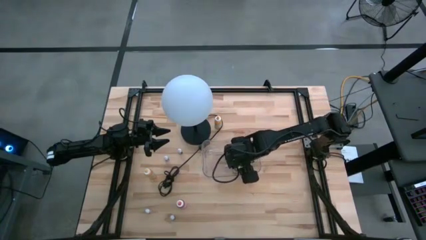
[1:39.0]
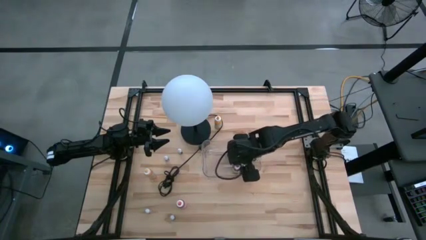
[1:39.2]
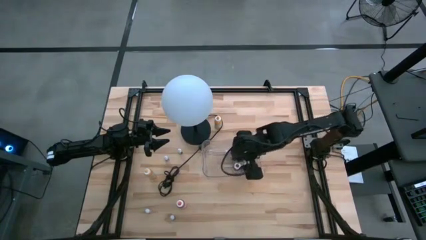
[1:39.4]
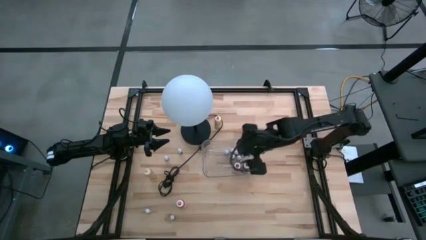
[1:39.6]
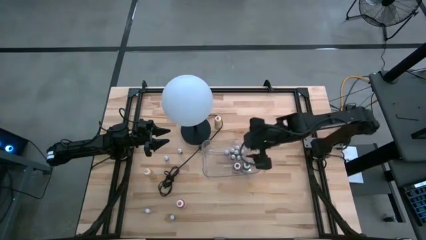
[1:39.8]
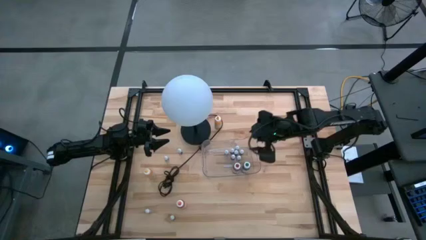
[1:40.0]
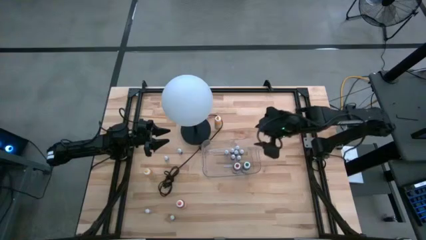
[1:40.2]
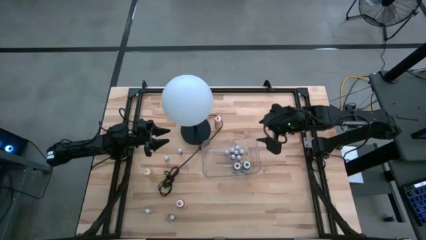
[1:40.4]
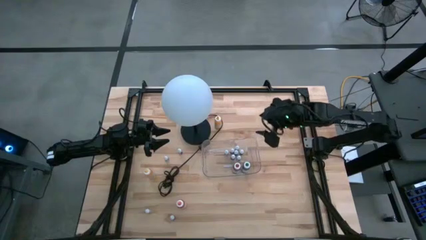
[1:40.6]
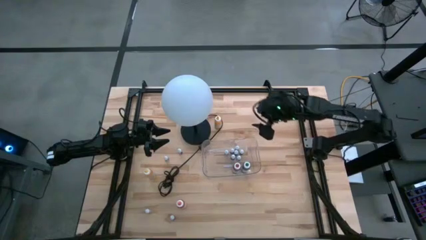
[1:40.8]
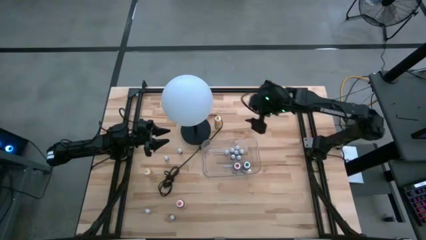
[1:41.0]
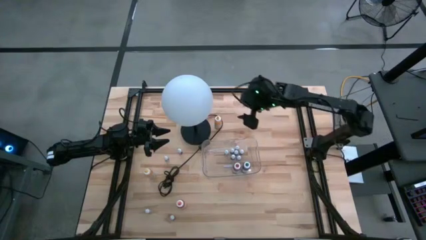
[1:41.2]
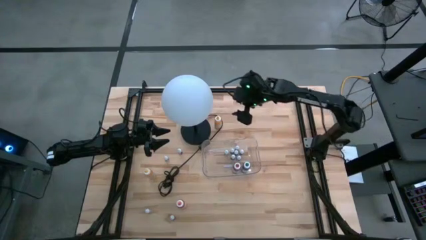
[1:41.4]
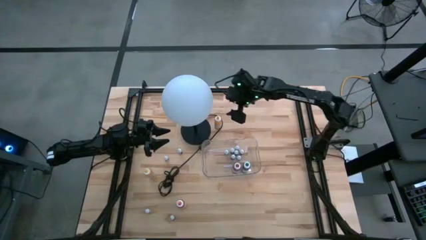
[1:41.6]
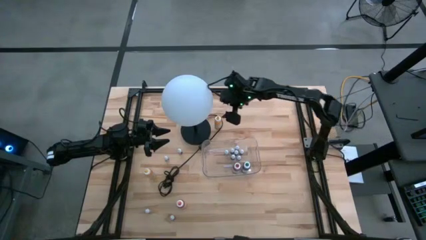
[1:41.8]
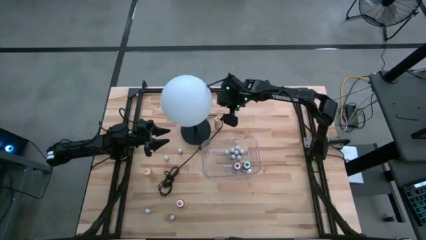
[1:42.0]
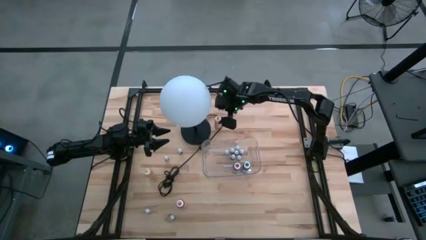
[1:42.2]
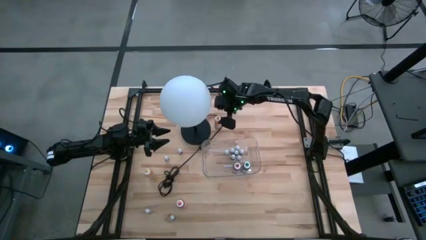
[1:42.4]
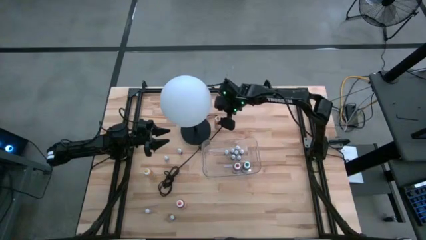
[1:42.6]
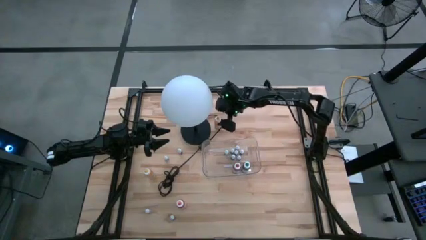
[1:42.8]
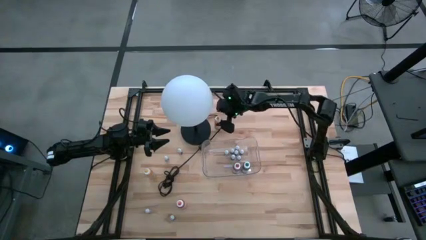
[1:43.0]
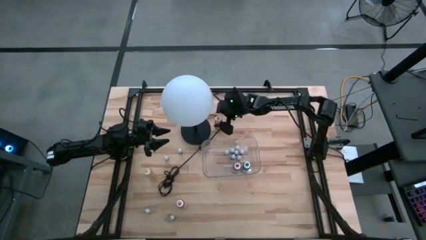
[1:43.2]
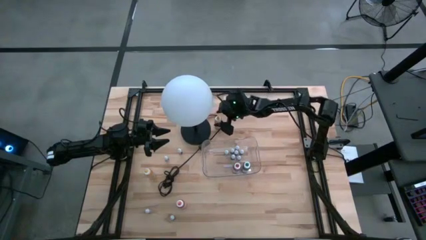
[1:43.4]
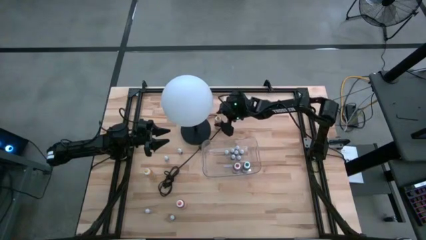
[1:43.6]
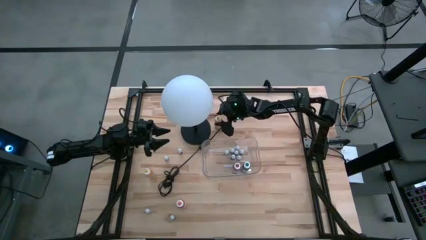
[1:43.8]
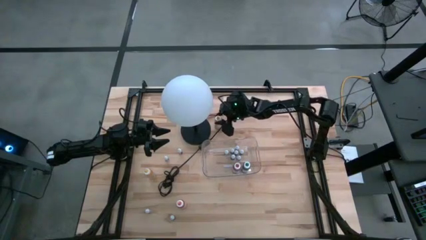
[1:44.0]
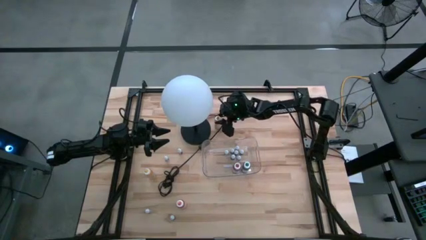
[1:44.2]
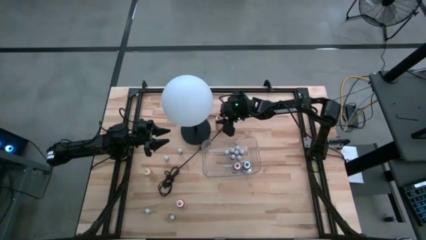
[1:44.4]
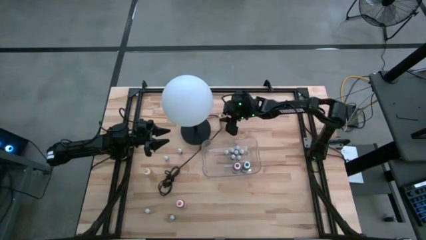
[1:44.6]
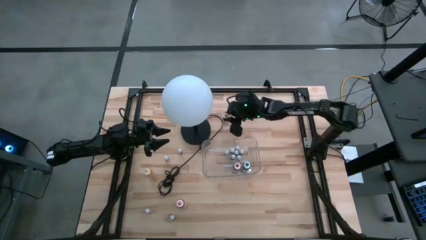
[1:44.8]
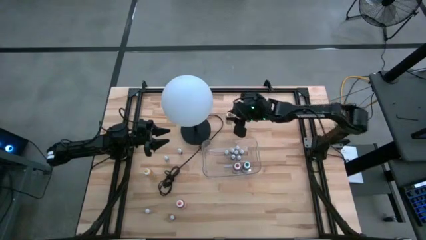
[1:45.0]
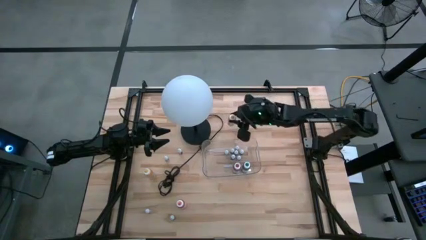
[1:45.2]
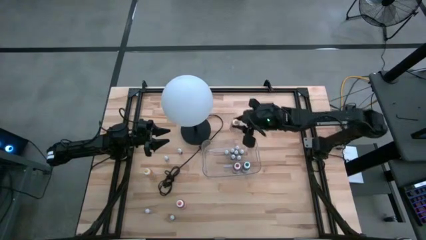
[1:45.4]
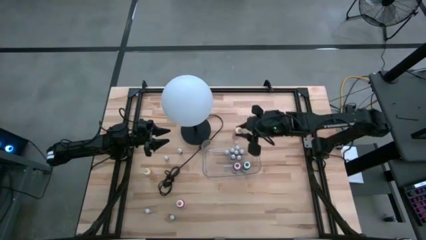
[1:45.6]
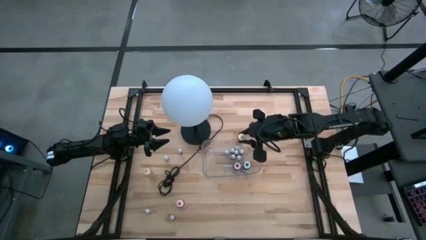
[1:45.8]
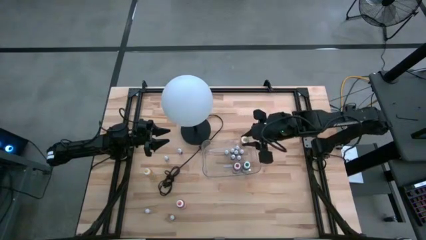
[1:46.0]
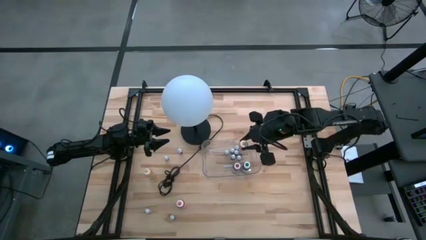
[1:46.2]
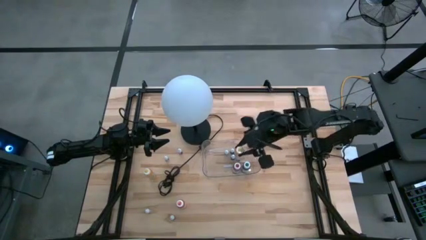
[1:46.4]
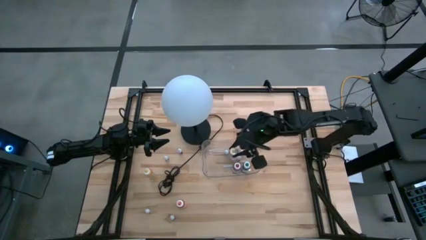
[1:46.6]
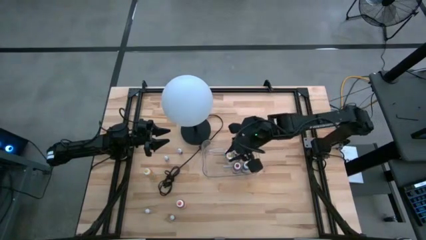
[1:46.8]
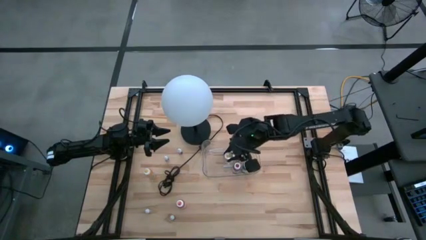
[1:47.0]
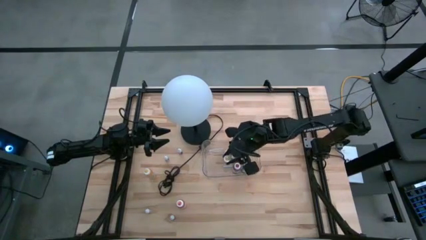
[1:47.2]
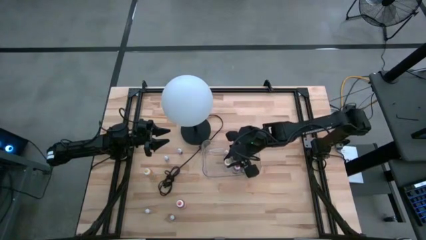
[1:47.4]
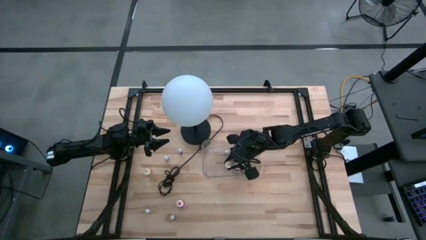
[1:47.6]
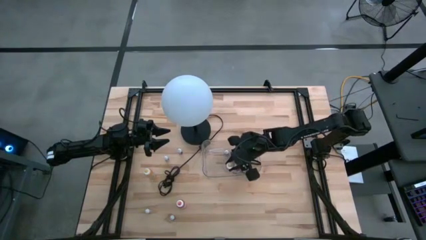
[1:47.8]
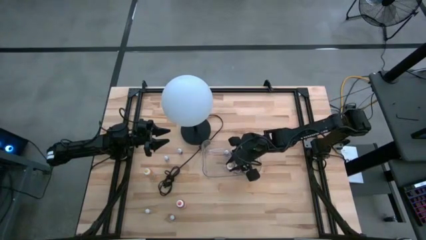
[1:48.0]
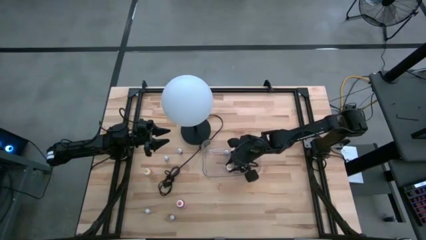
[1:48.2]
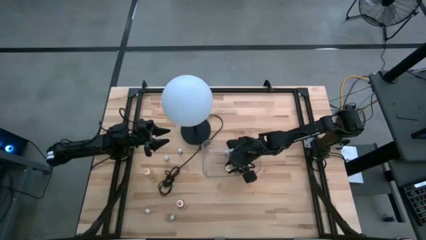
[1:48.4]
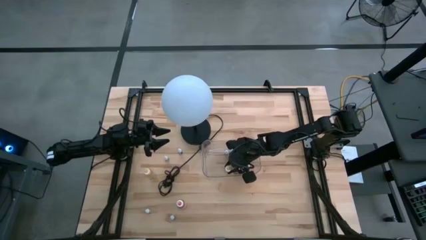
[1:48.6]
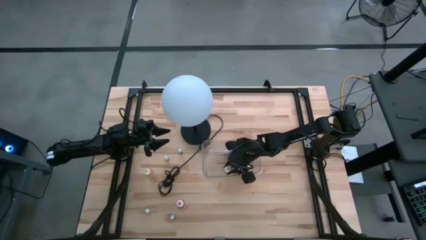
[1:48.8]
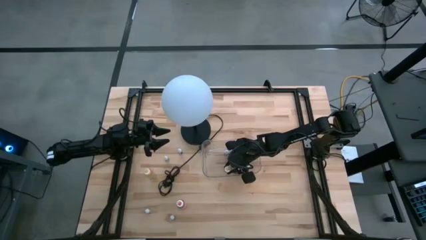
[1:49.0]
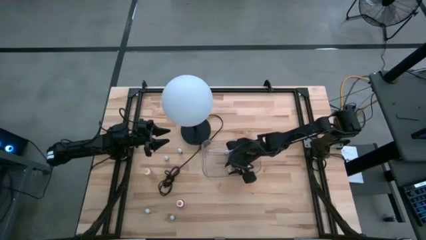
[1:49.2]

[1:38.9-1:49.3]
Task: Pick & Place food coloring
Put the large yellow food coloring bottle into the transparent bin

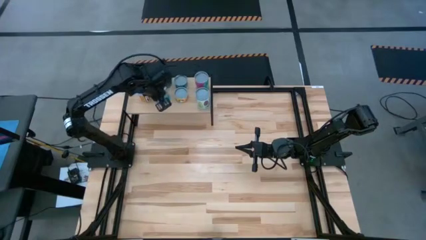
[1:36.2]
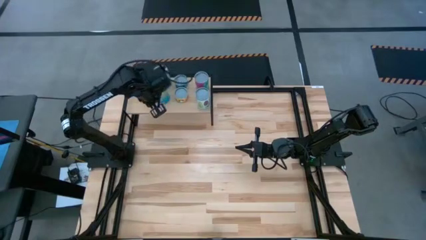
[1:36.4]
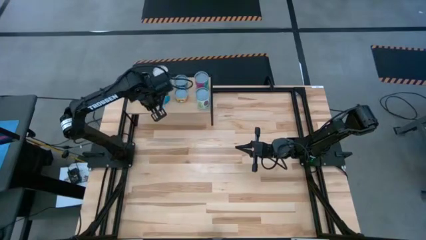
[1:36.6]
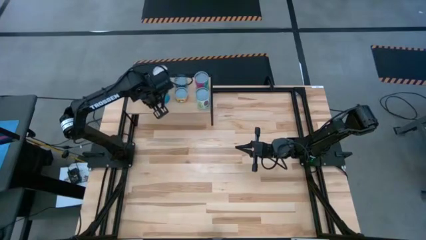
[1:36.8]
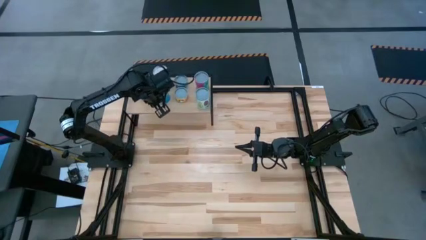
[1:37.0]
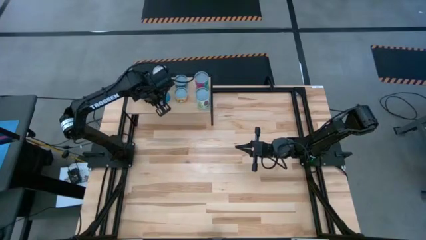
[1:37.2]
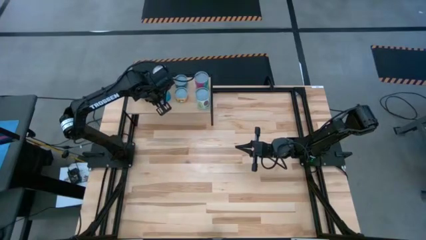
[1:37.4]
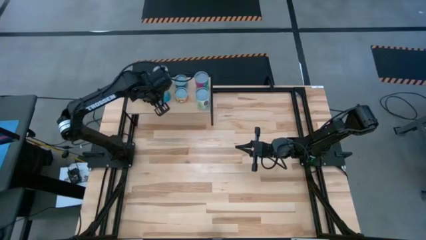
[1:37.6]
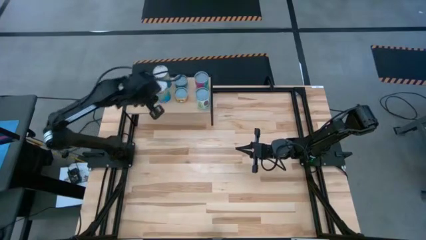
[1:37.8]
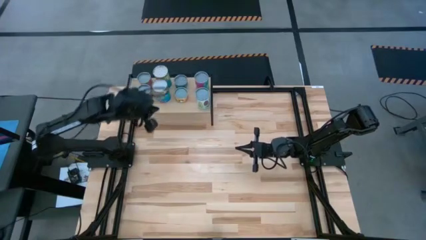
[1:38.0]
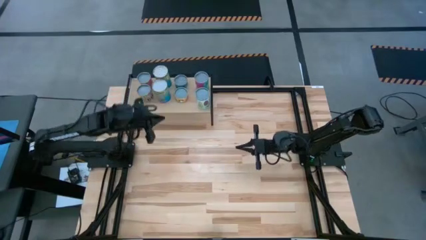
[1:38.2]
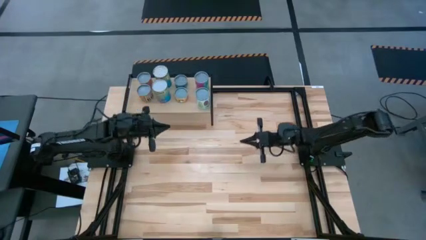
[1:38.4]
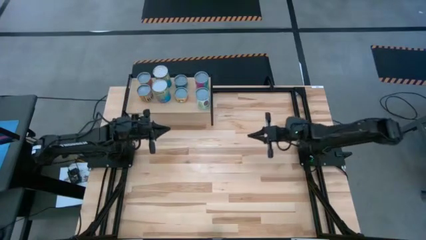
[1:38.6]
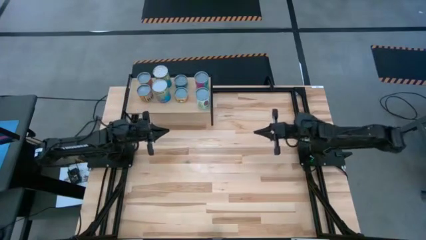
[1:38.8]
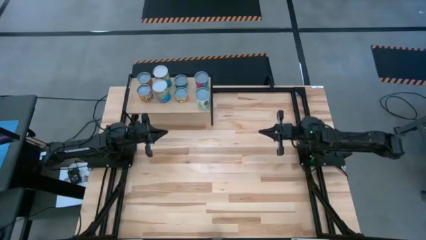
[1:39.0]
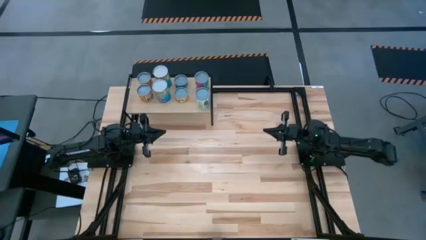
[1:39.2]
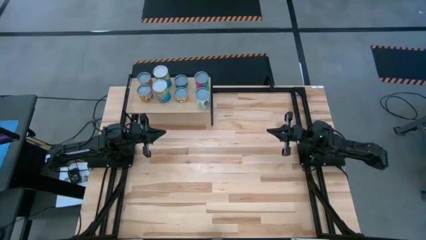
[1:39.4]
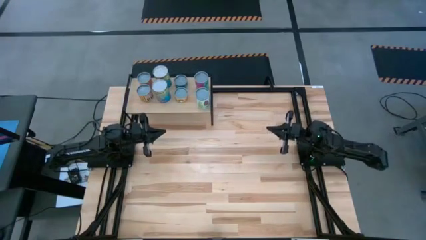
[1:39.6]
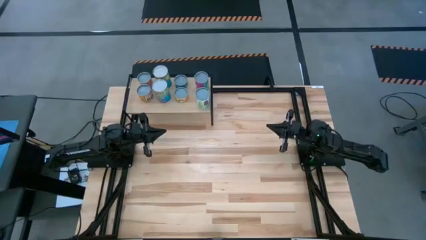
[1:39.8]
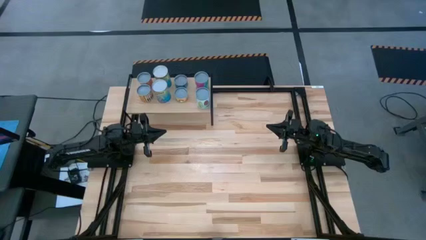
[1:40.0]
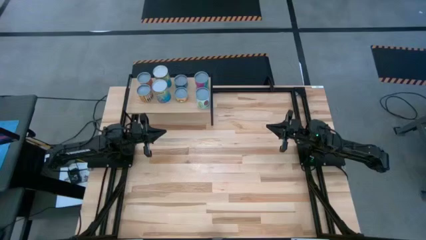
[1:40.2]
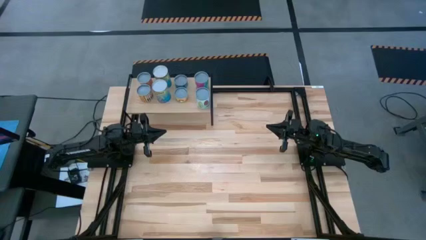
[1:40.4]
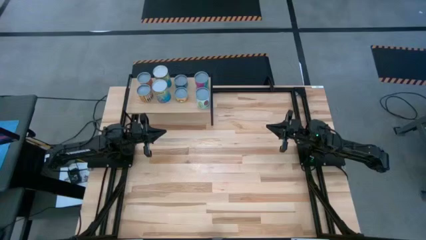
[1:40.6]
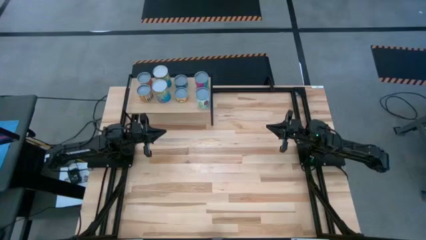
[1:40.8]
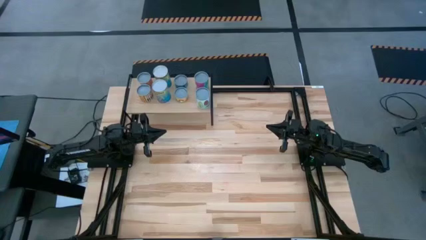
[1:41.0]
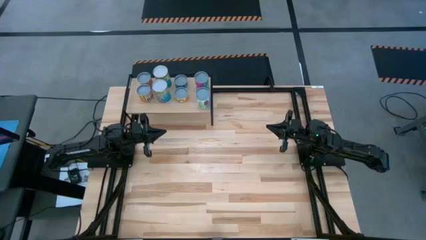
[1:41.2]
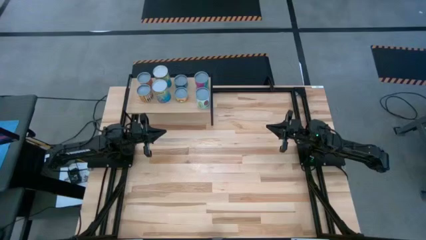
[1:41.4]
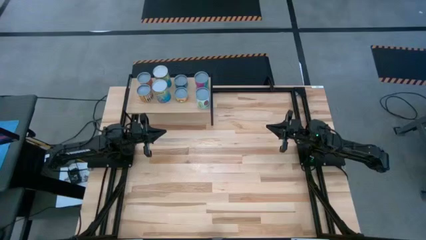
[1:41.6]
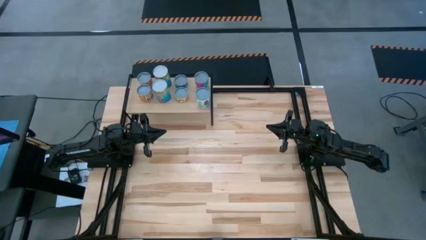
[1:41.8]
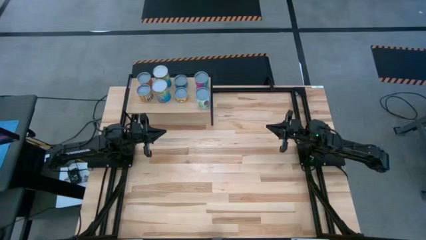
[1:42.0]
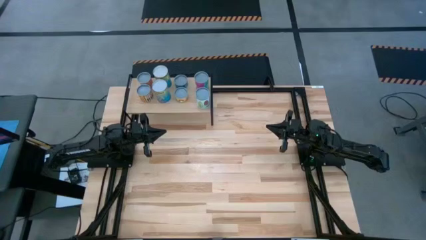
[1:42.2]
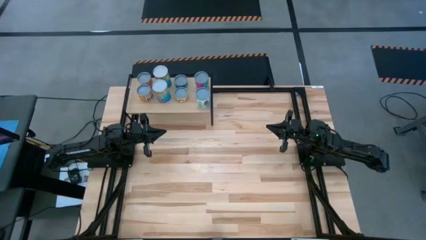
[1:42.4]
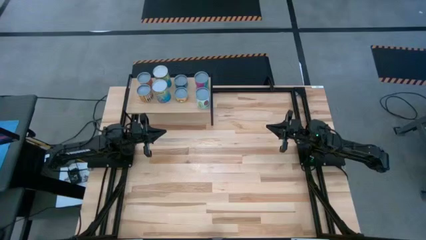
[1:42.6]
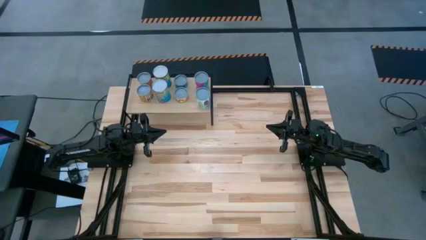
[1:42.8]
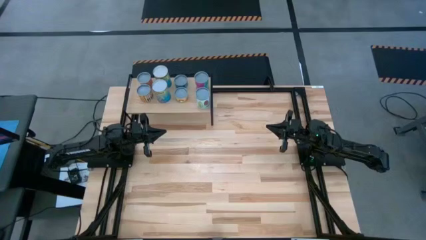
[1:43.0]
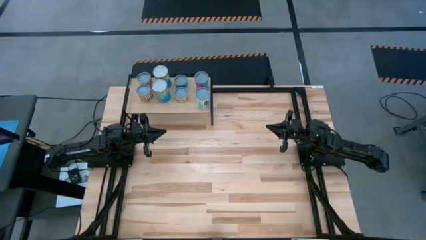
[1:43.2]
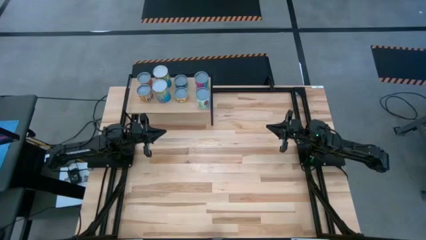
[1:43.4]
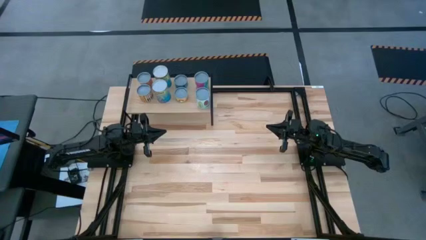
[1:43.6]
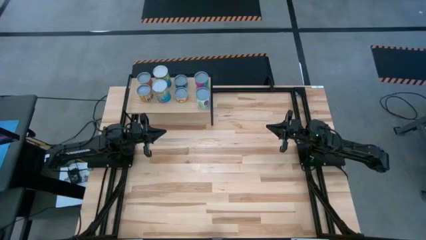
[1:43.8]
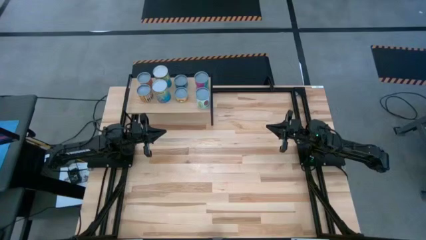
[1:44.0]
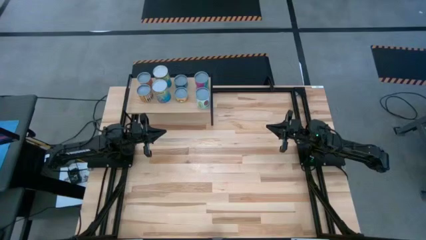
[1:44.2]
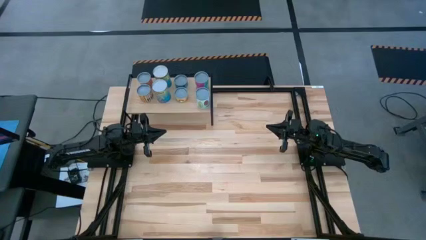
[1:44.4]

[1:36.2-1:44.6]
Task: Pick and place cans onto a shelf
Return to Home Position
